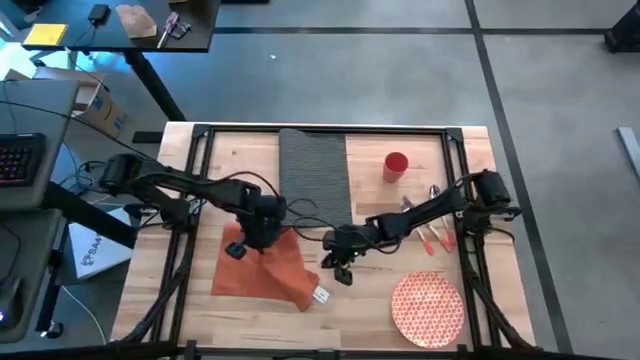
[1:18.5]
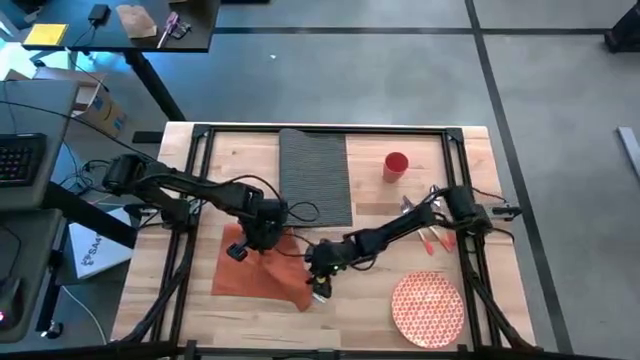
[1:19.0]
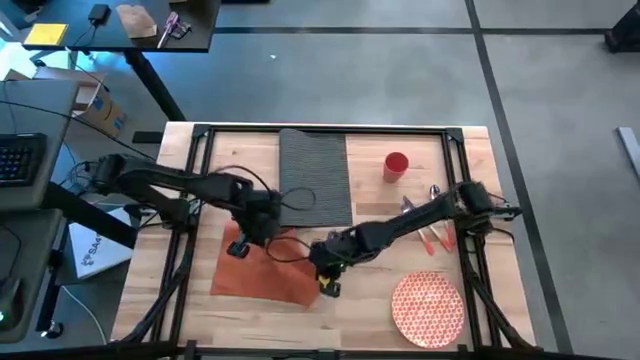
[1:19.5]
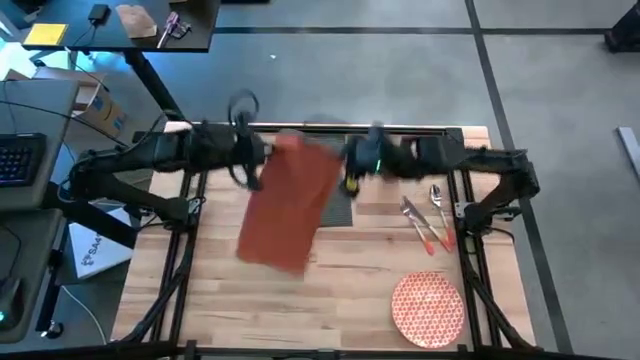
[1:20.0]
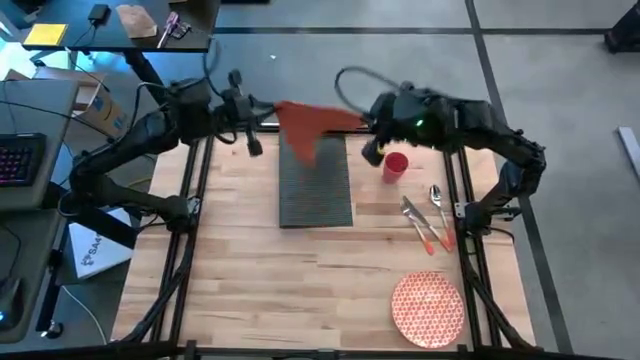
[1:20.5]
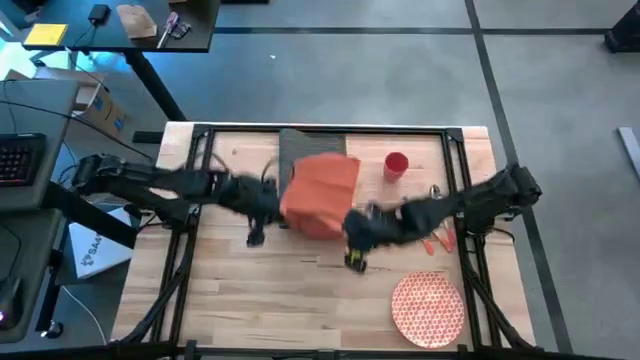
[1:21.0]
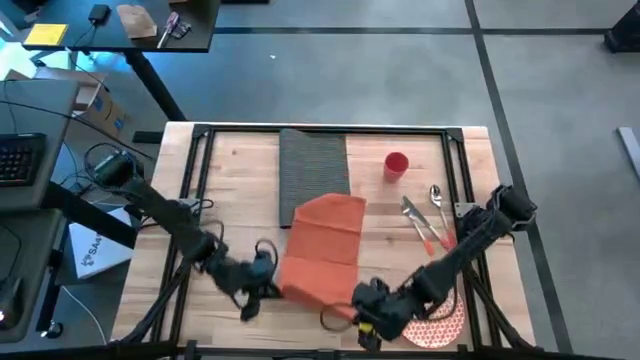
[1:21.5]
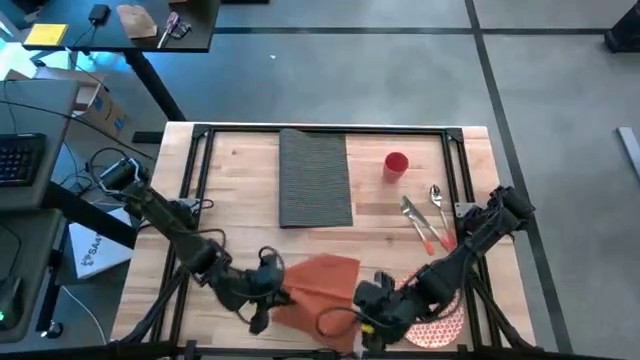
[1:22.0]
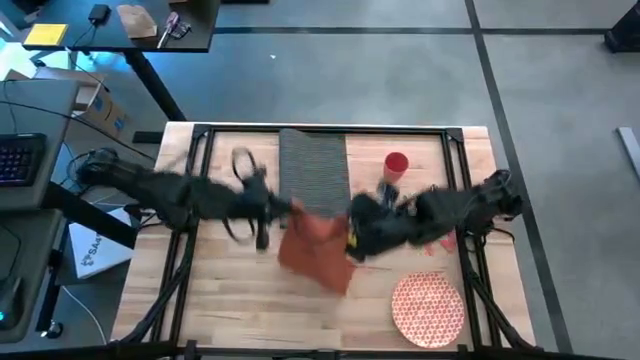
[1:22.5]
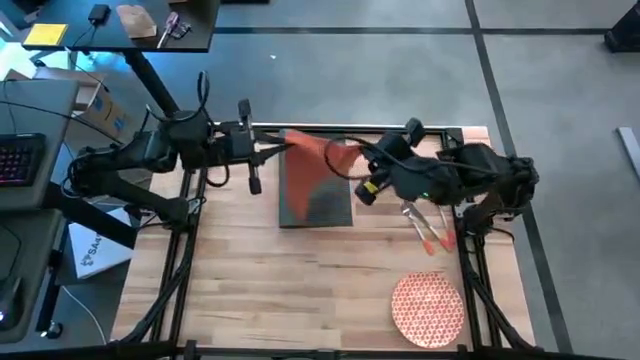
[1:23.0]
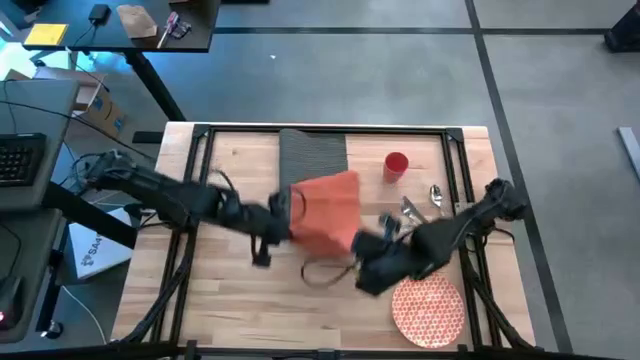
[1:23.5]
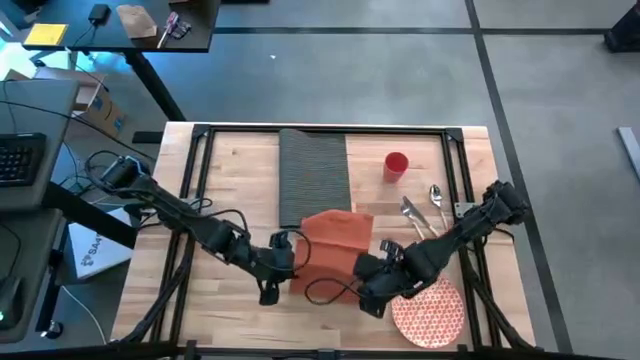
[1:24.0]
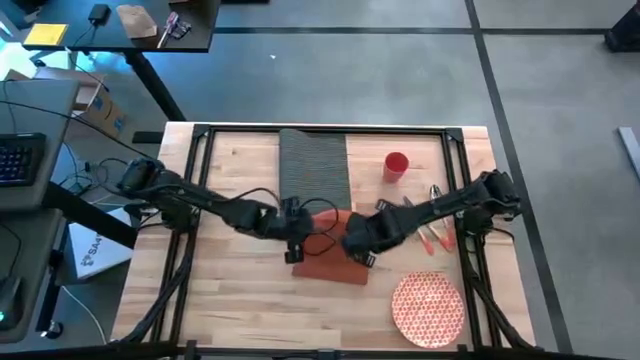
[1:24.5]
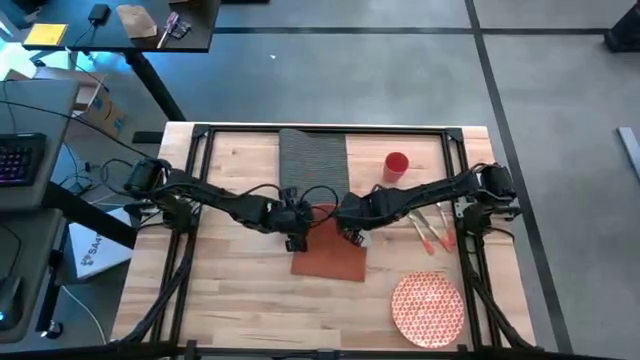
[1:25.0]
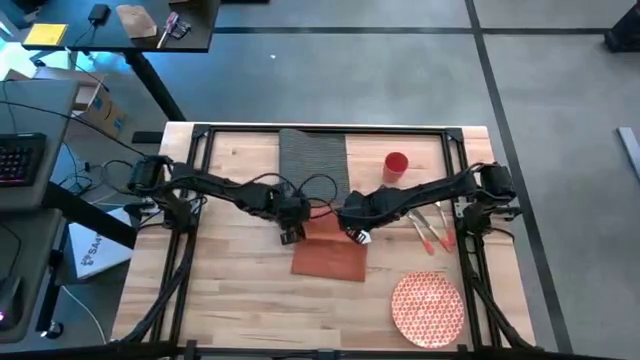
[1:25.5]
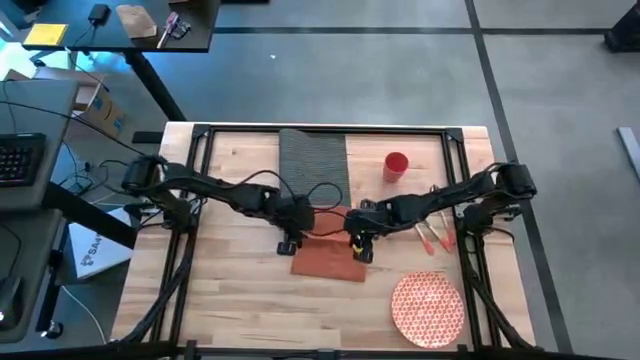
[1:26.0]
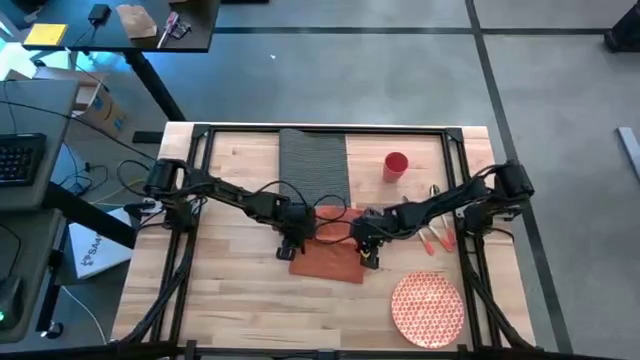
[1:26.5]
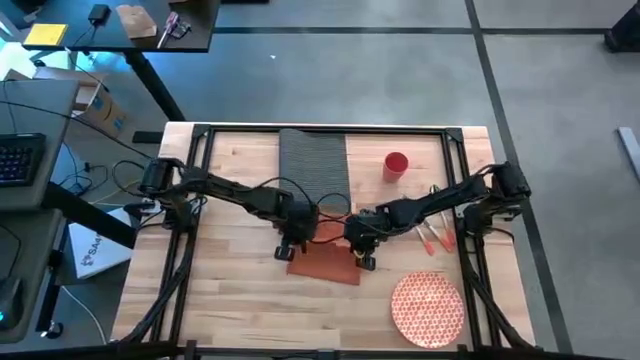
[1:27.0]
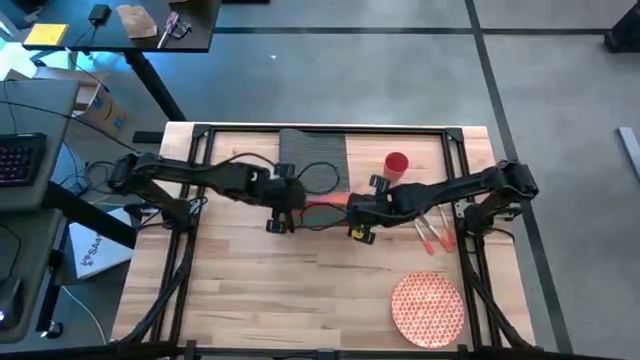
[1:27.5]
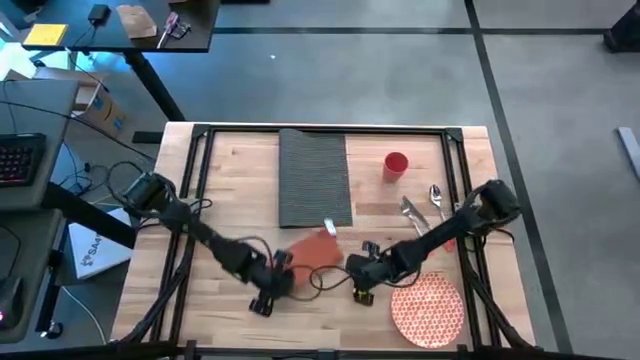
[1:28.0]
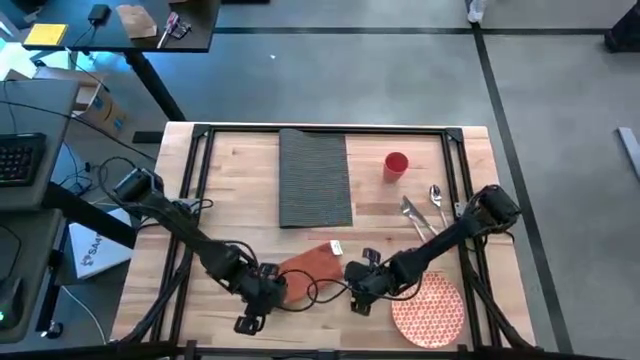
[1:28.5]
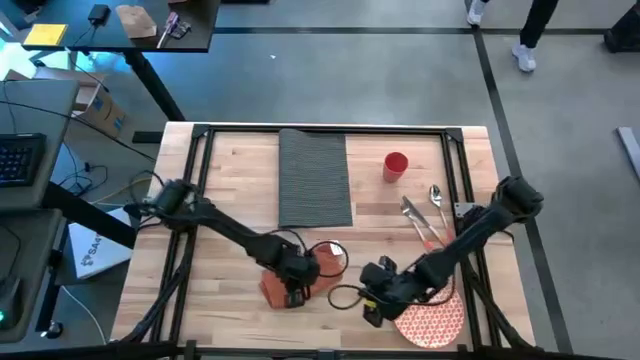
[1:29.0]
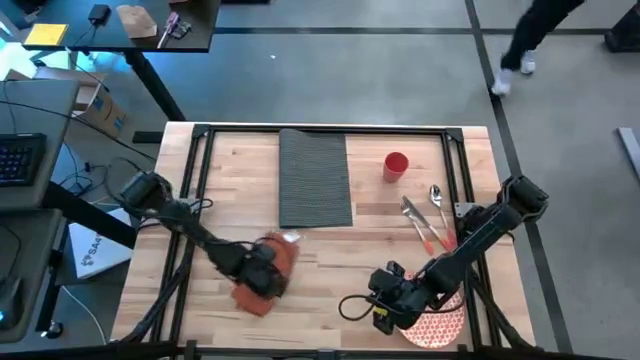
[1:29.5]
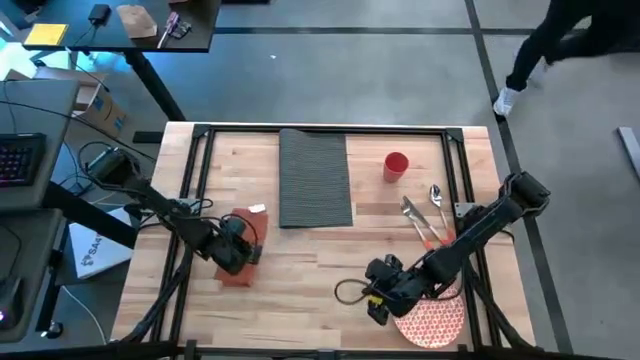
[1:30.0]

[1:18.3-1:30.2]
Task: Set table place
Fold the orange napkin

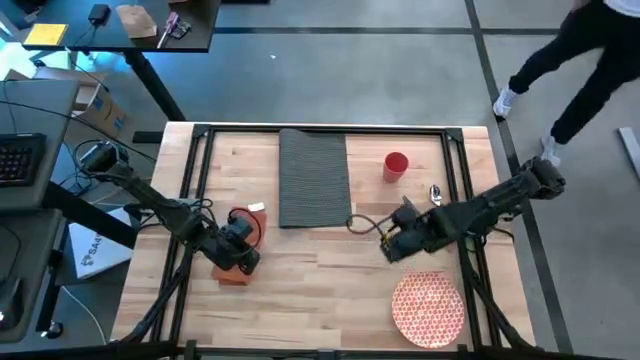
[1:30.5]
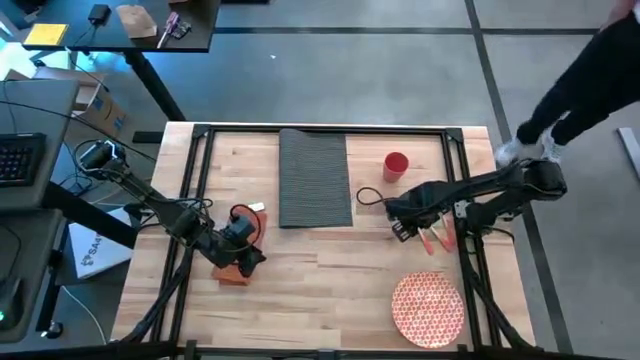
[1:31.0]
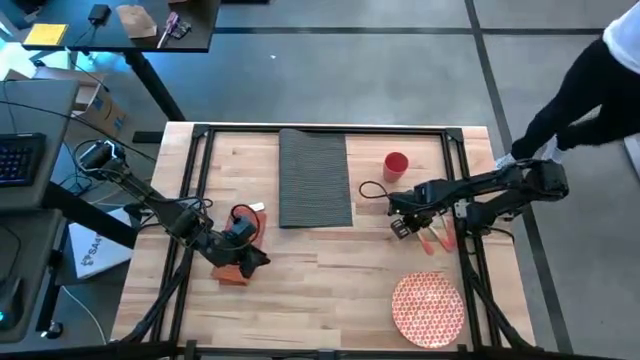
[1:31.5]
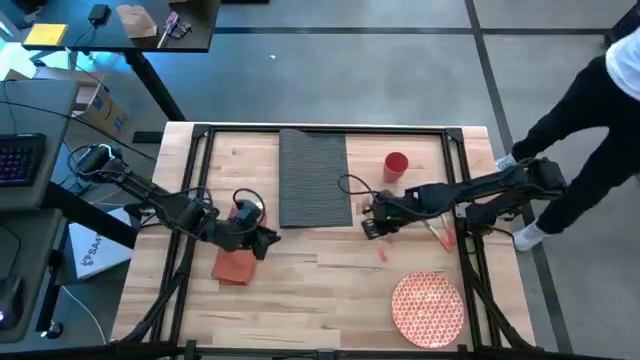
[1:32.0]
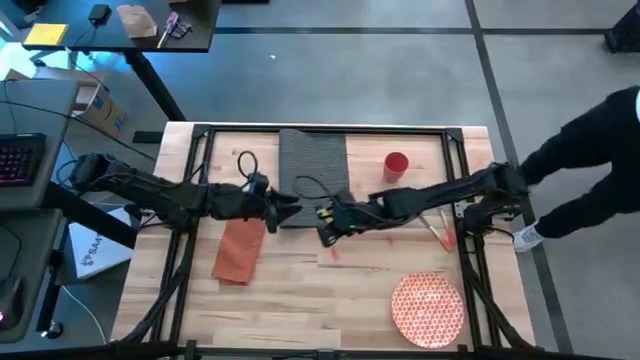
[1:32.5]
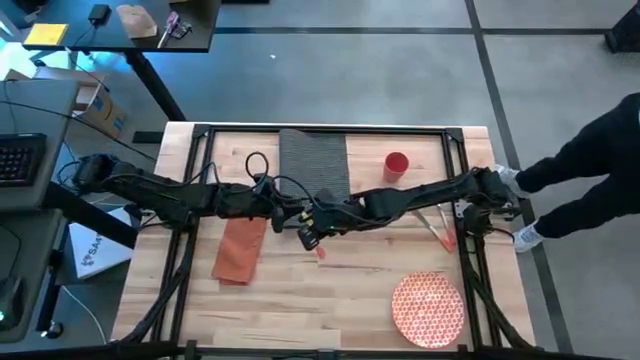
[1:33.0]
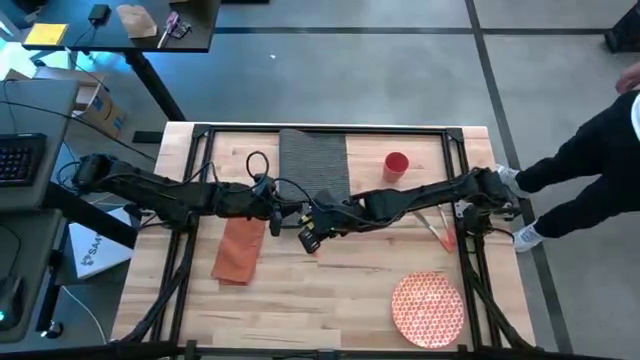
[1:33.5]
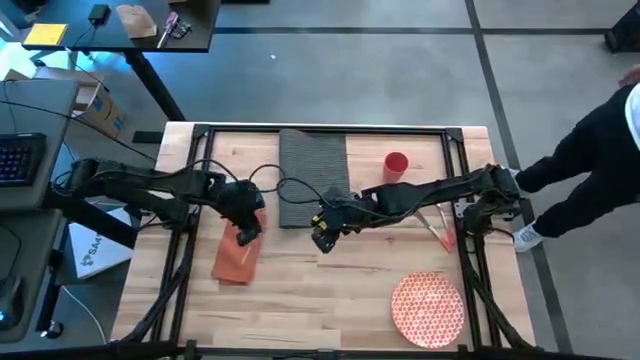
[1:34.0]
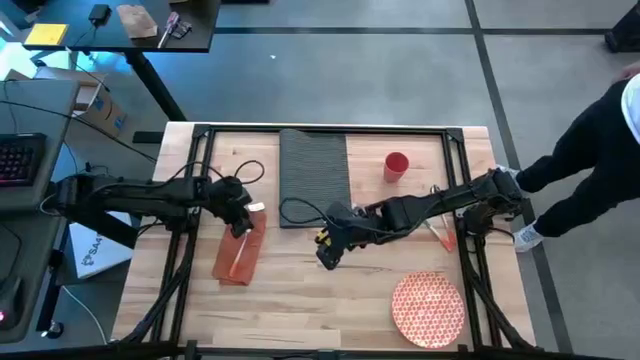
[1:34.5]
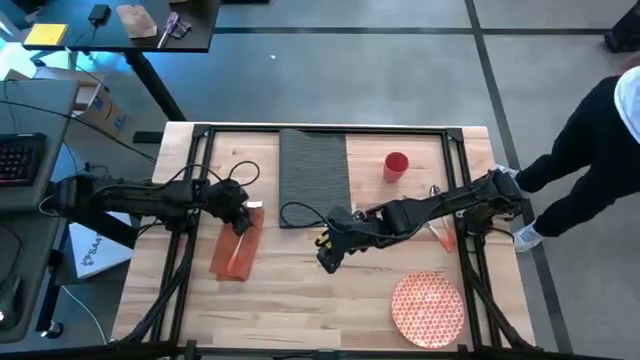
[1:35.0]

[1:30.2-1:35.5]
Put the orange fork on the orange napkin

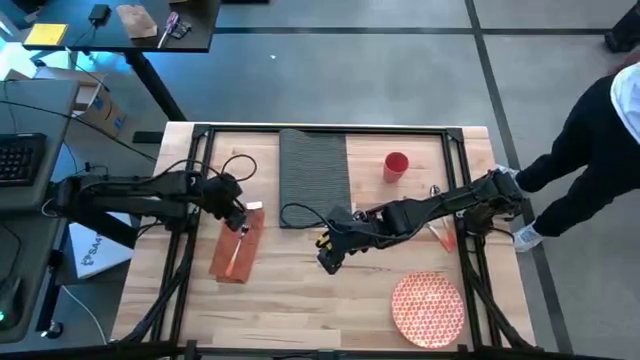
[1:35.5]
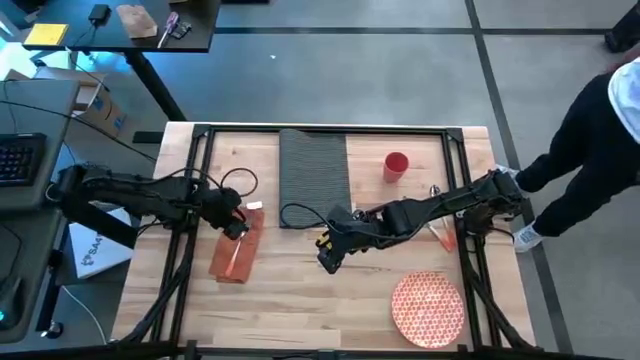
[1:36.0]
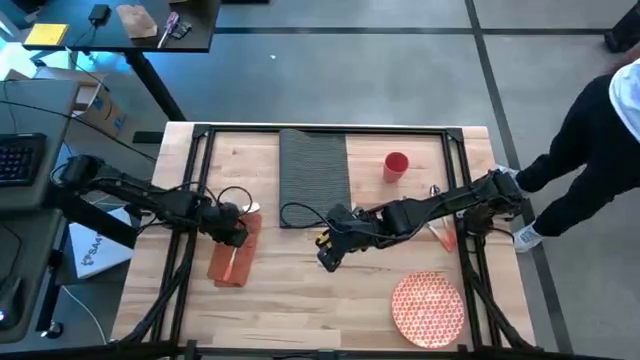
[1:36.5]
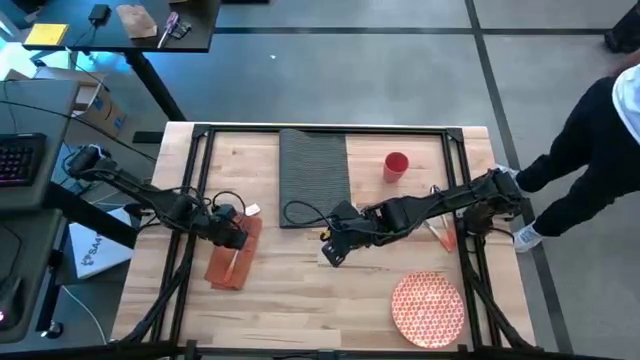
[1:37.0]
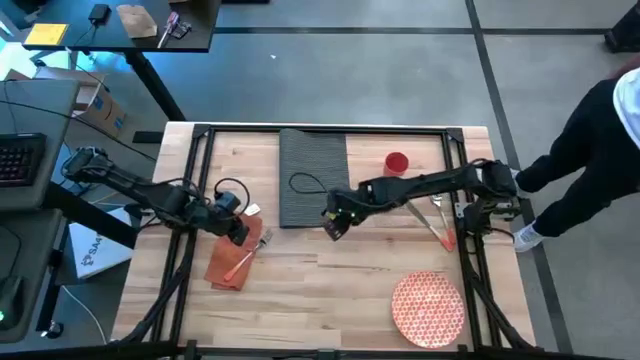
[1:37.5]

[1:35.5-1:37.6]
Put the orange fork on the orange napkin

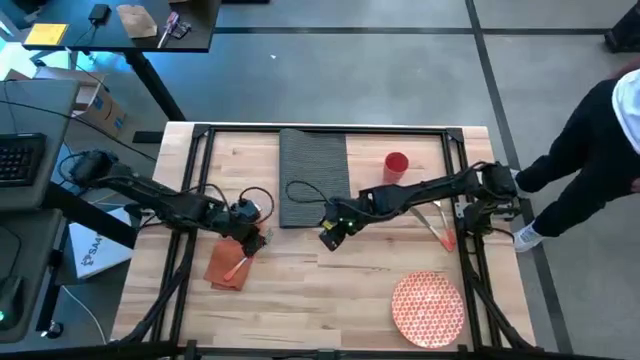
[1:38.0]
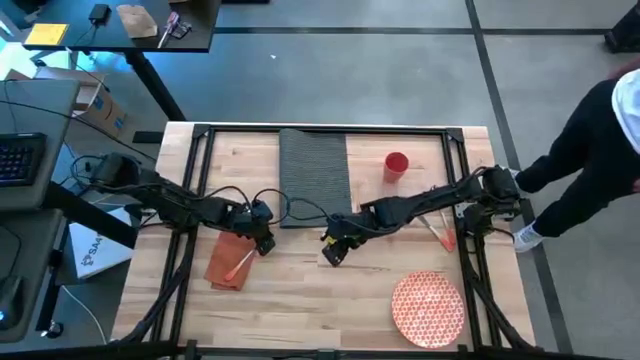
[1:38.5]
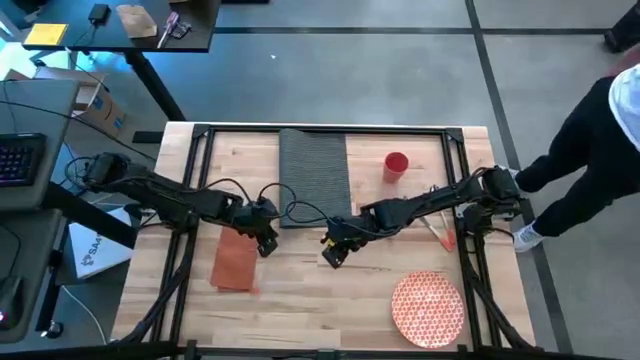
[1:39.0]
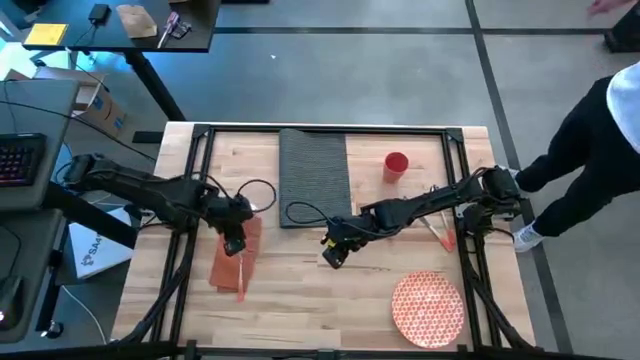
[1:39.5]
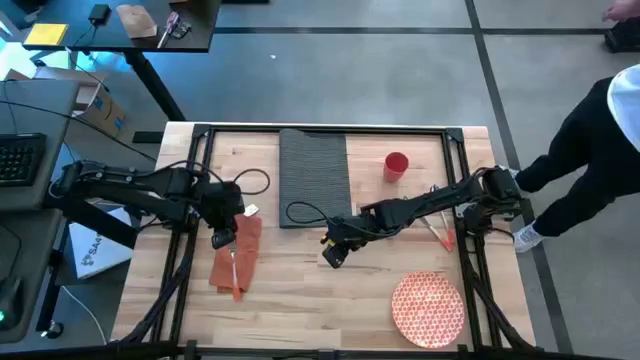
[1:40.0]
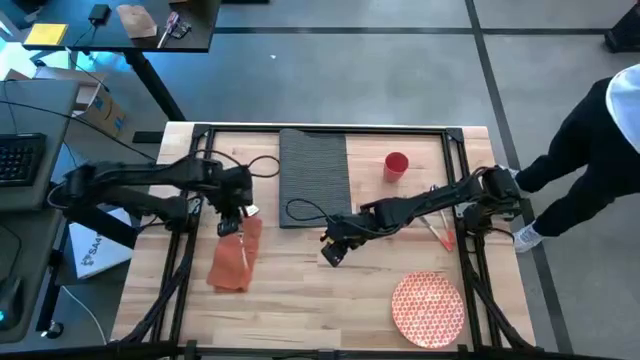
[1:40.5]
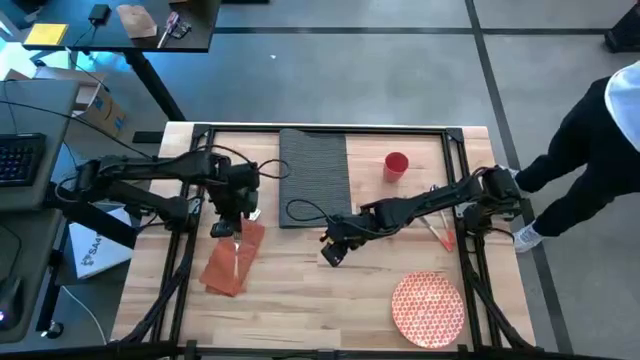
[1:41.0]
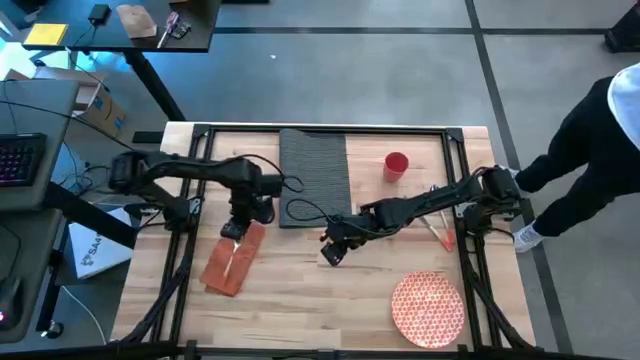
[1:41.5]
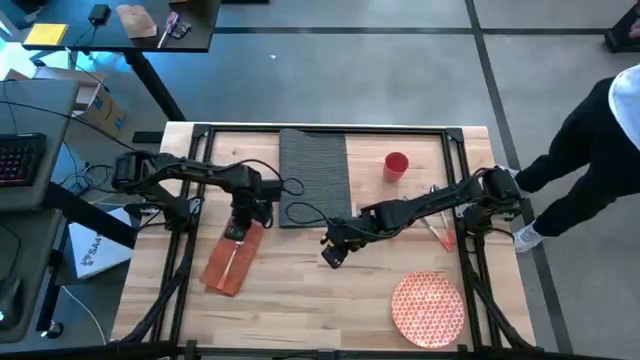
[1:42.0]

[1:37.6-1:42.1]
Put the orange fork on the orange napkin
